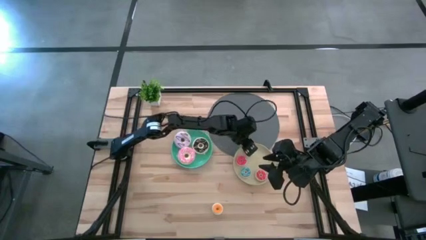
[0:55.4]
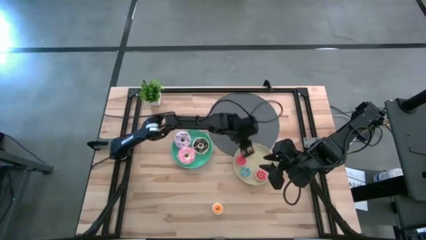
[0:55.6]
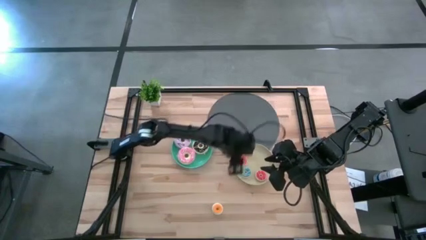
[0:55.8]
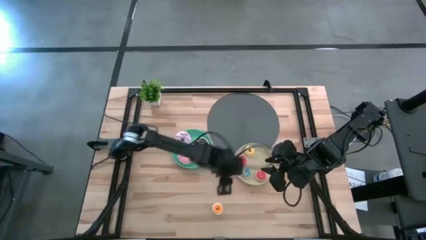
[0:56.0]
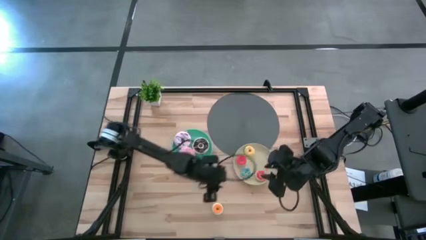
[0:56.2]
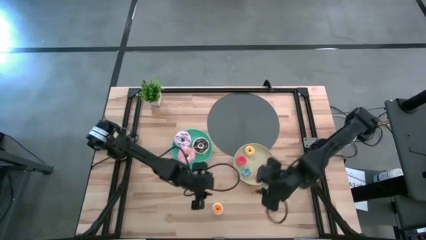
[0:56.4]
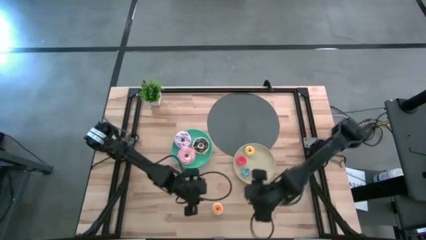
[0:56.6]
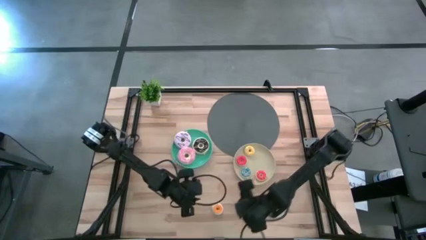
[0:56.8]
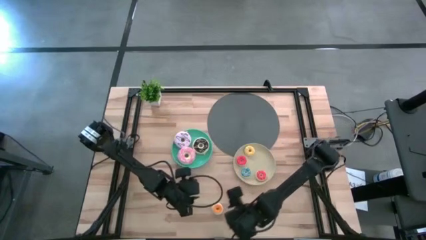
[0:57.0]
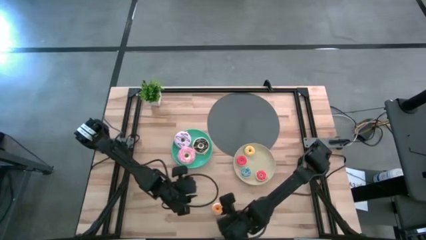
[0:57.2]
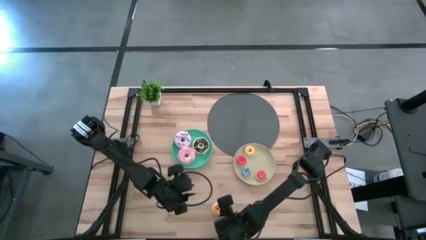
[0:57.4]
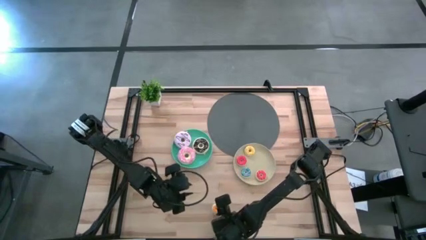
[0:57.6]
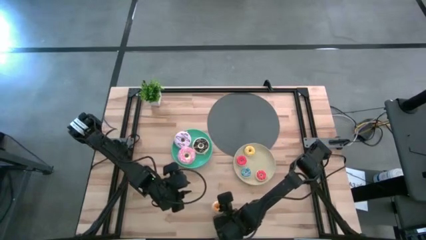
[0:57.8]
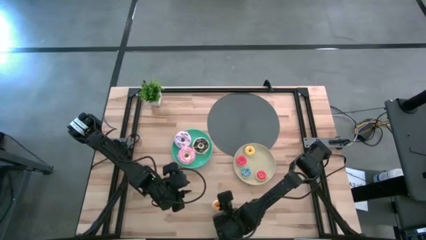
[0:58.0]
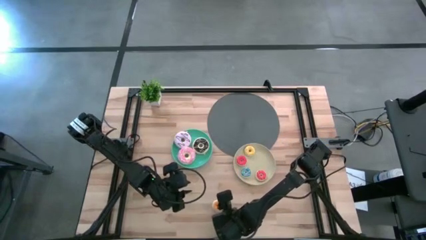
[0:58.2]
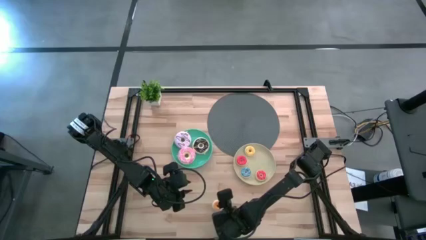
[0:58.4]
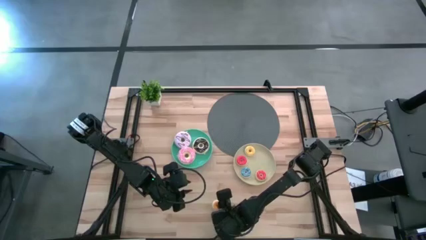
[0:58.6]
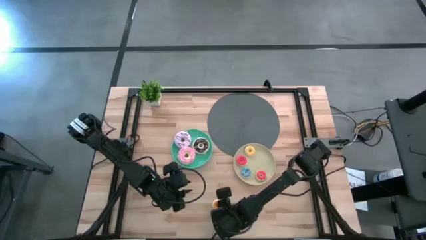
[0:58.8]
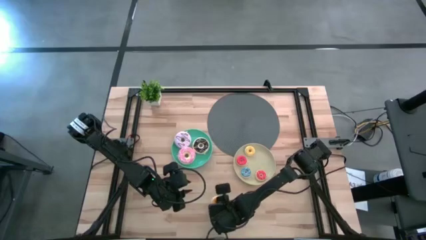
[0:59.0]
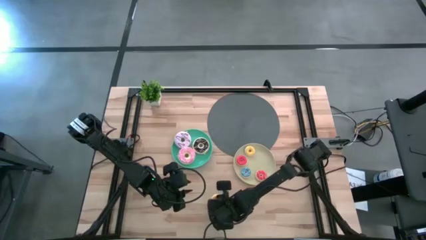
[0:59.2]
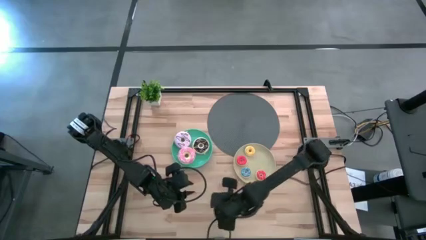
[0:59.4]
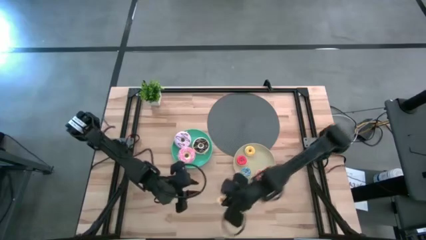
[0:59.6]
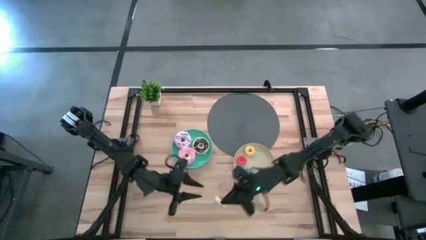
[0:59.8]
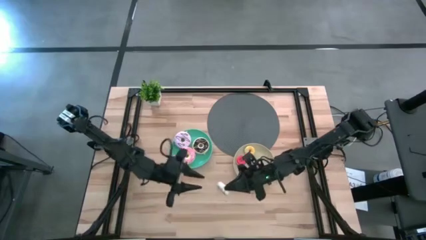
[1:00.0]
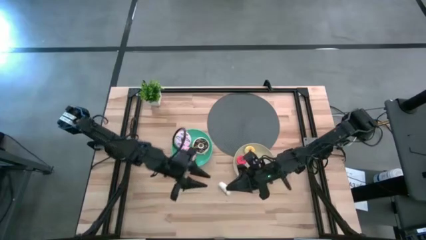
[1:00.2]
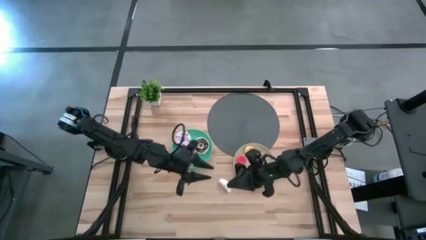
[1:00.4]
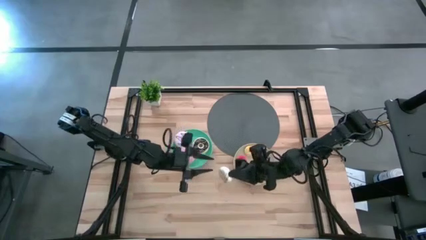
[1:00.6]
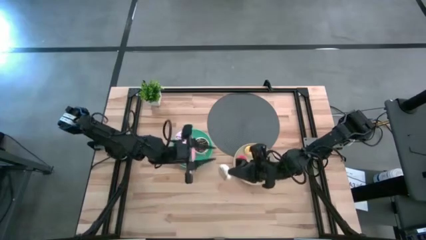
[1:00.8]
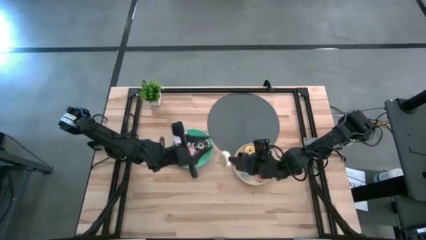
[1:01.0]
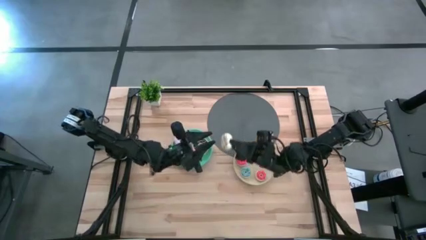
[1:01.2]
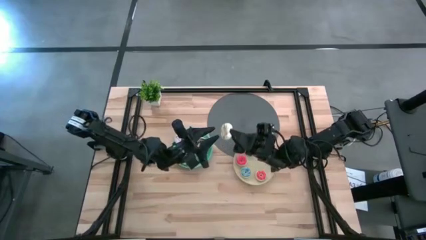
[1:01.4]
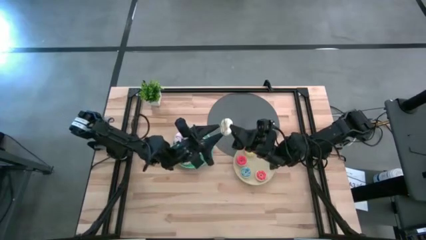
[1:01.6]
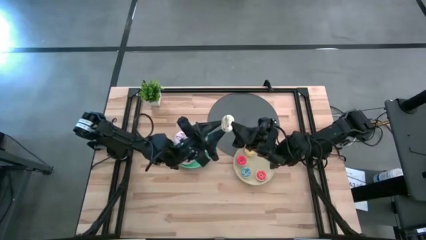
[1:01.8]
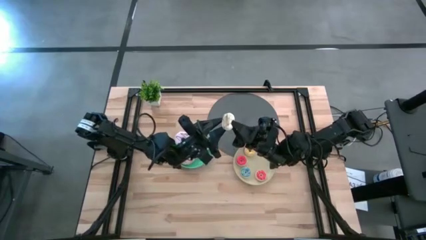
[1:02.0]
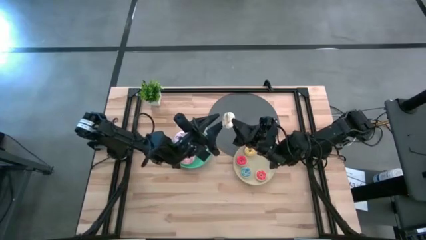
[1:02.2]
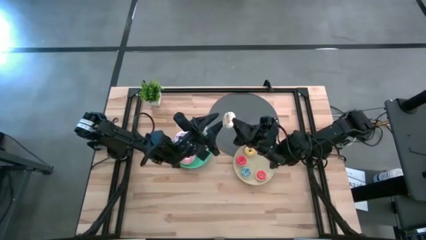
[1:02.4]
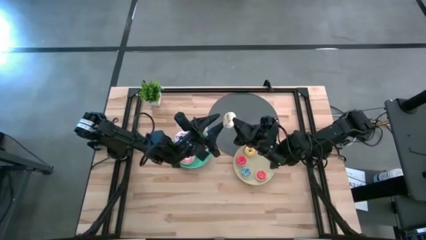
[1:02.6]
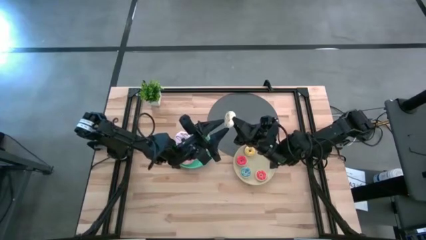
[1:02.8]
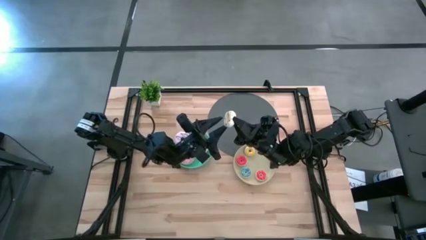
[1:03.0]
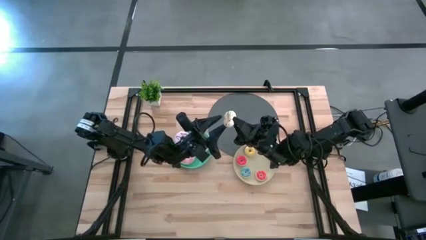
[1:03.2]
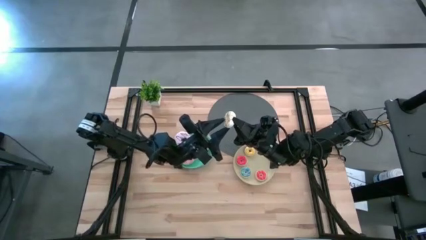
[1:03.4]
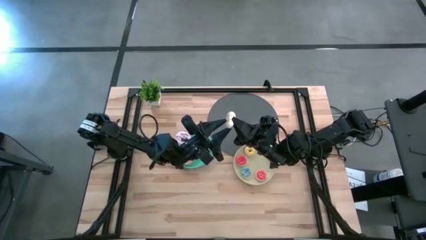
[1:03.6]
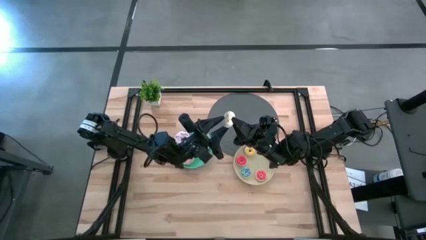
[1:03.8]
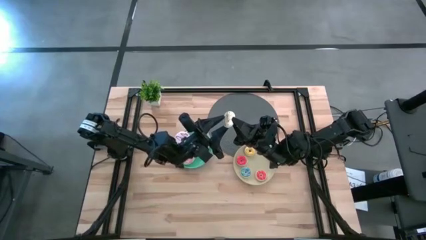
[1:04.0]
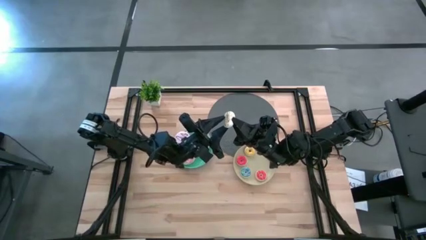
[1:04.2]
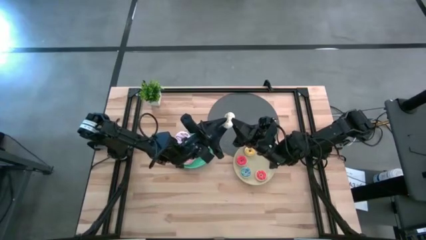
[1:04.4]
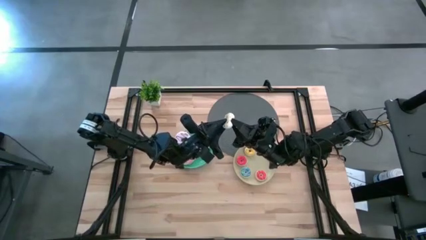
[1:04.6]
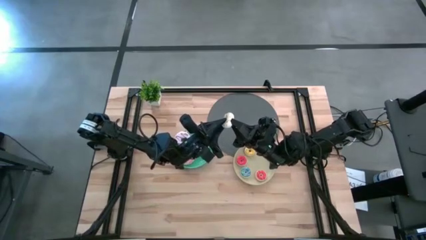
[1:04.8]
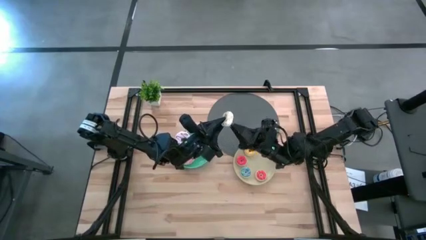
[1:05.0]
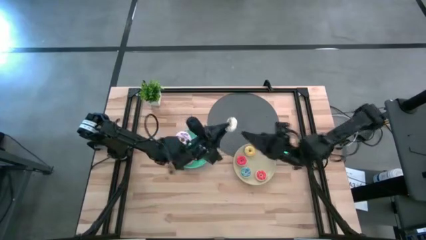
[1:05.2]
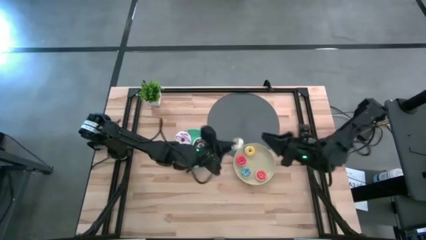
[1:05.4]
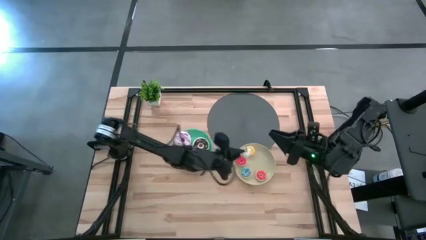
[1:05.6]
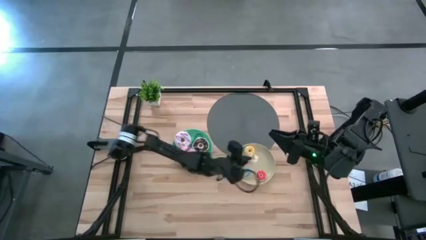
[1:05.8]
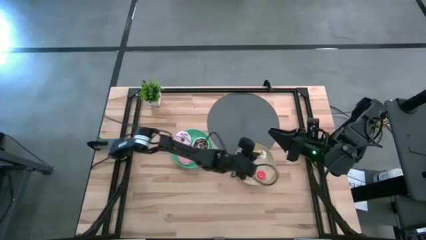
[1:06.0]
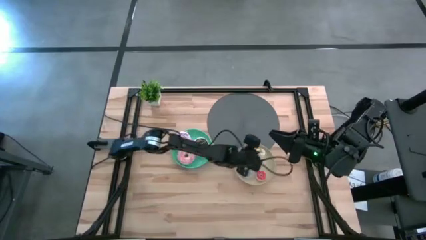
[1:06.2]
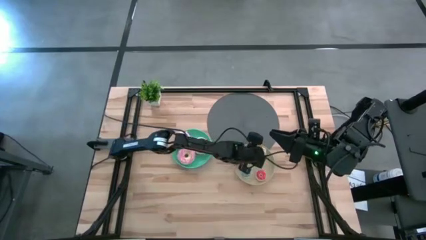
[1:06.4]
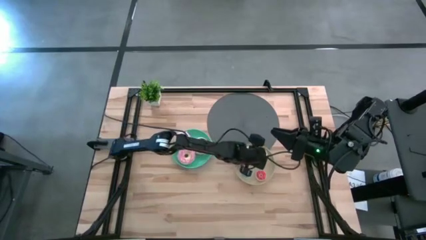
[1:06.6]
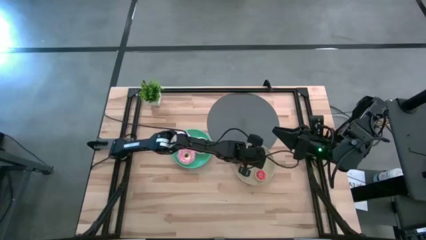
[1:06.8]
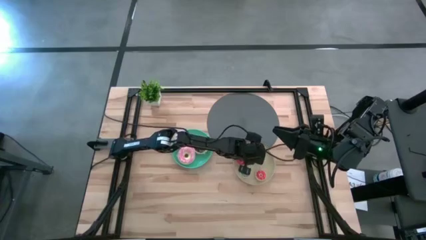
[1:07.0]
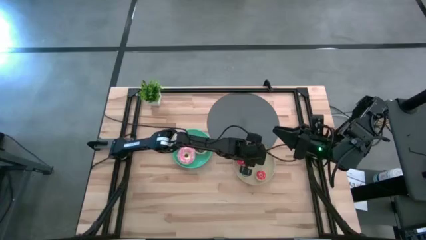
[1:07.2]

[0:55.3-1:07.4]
Task: Pick & Place donuts
Put the small white doughnut on the brown plate

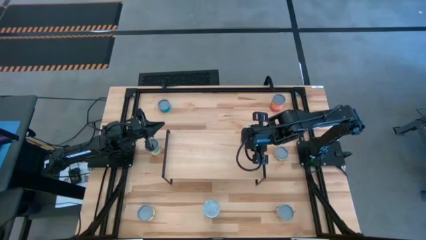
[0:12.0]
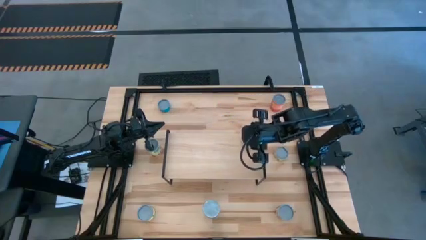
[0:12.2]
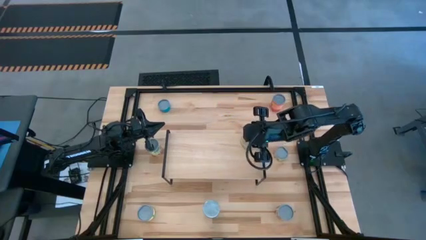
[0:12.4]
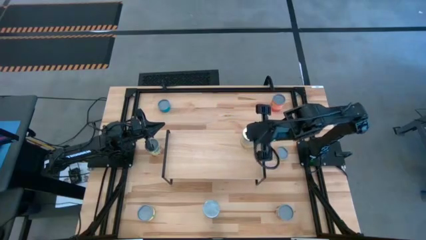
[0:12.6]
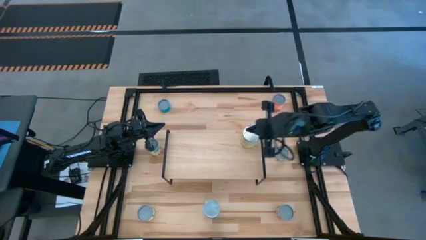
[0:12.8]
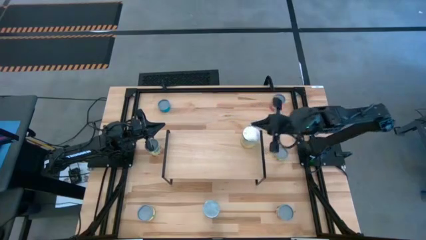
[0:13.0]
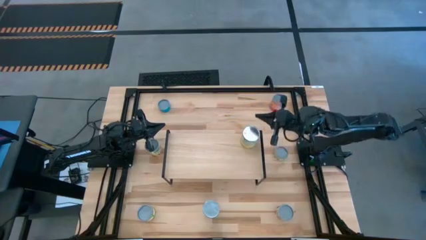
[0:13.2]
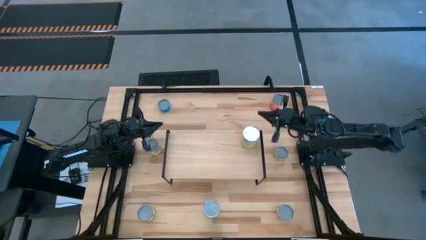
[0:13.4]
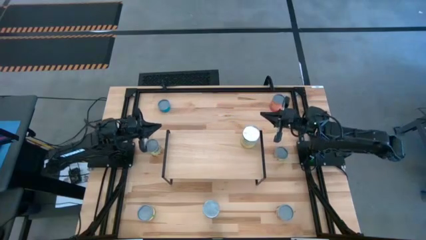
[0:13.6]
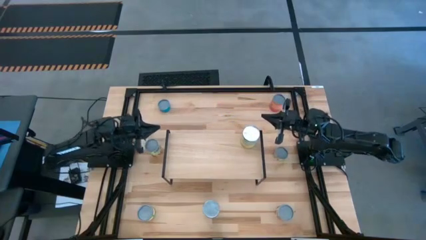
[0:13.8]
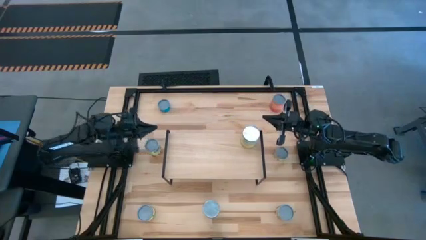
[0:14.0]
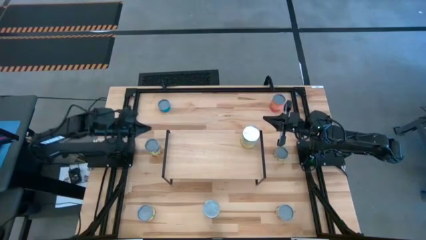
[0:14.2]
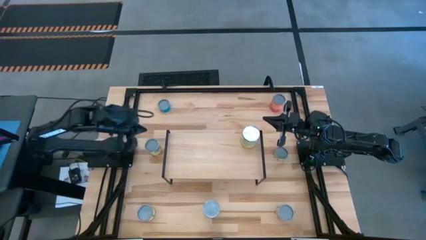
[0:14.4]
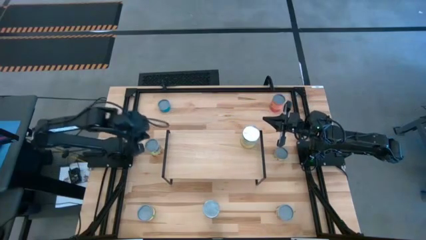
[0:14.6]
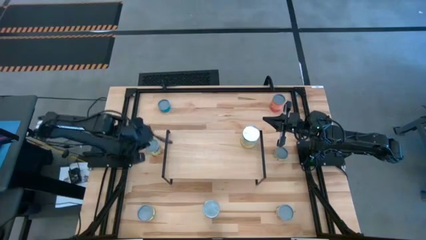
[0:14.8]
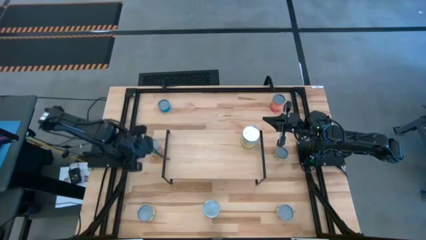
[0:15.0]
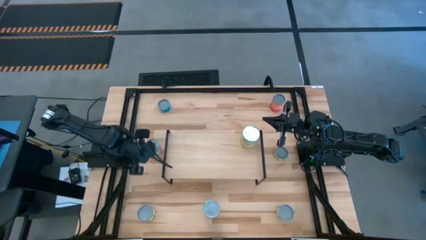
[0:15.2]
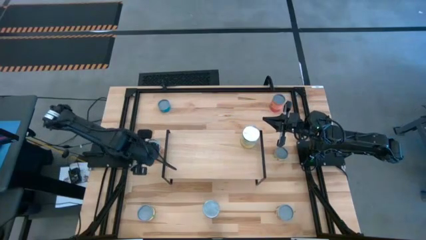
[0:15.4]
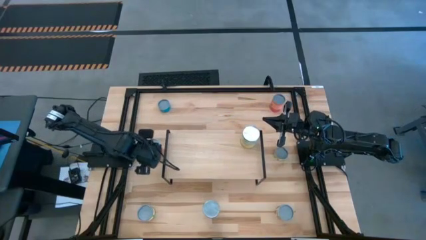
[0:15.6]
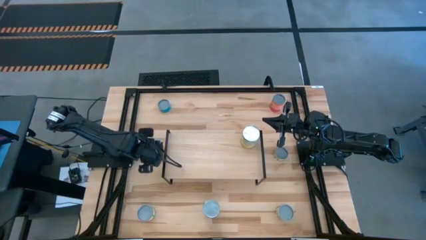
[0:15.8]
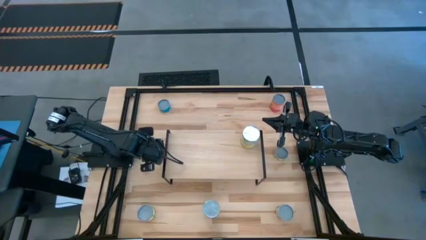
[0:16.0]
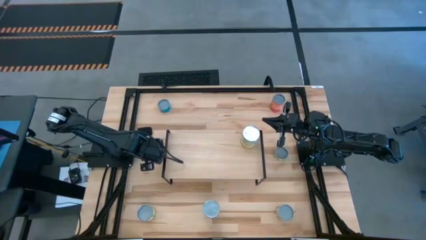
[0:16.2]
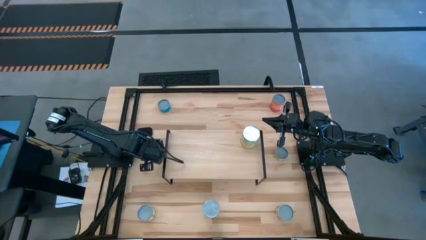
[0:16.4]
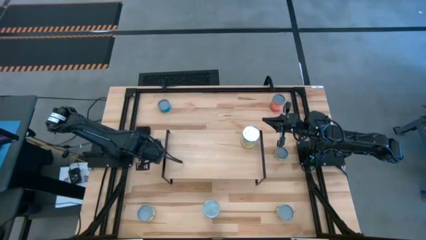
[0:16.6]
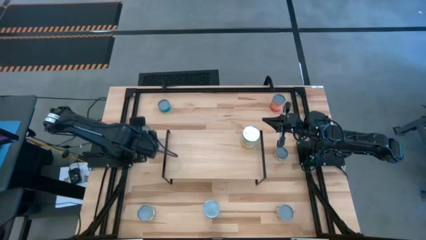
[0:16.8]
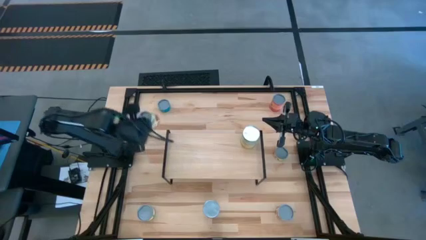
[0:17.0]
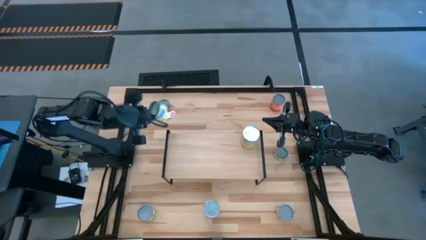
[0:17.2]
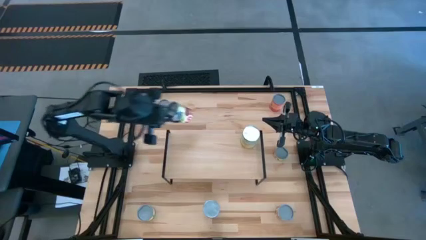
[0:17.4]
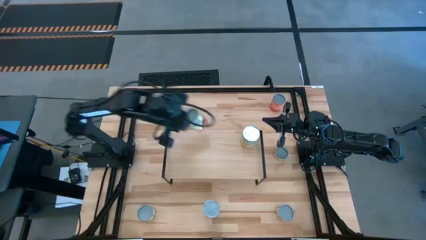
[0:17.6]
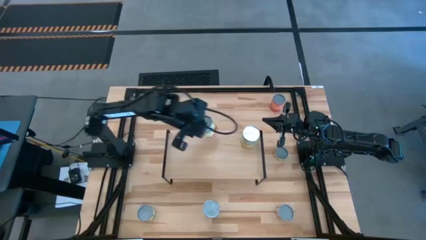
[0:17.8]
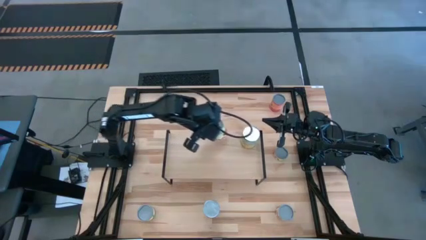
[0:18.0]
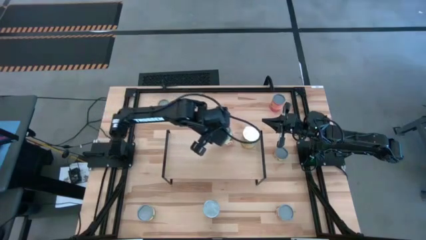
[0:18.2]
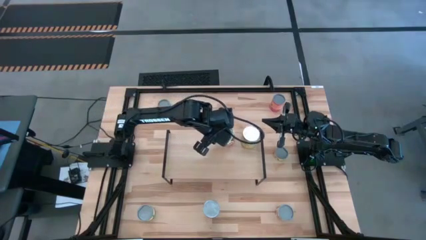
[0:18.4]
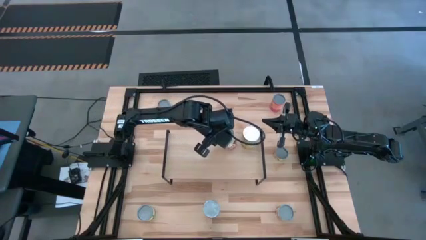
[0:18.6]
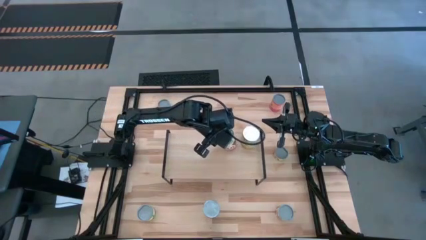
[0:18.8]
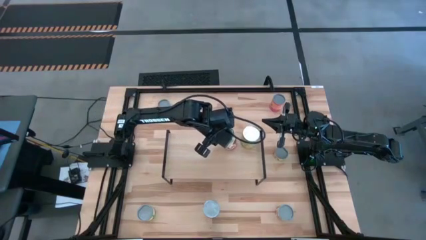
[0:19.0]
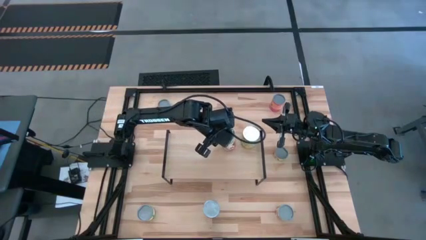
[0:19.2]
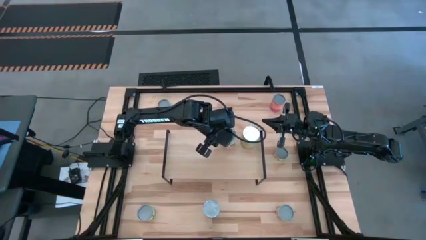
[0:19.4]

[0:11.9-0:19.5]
Task: Pick and place cans onto a shelf
Put the canned spaghetti sauce on the shelf
